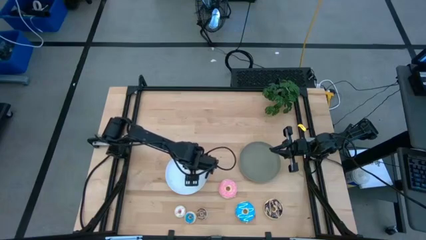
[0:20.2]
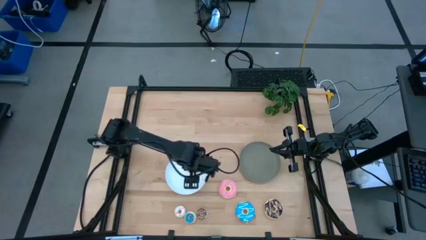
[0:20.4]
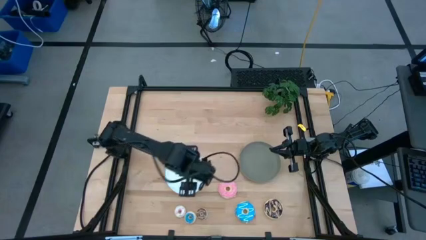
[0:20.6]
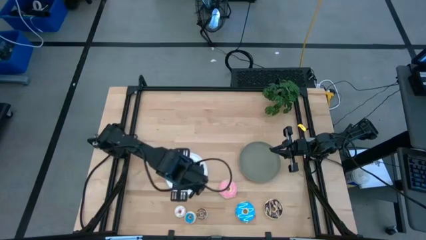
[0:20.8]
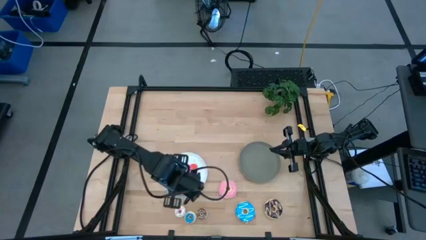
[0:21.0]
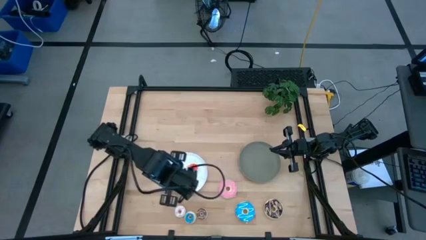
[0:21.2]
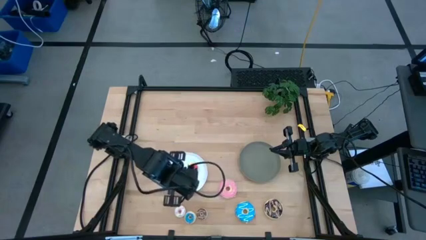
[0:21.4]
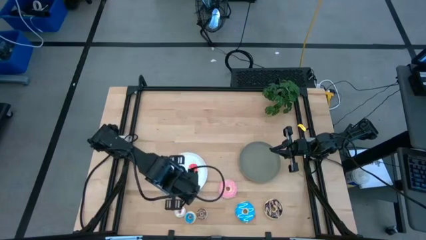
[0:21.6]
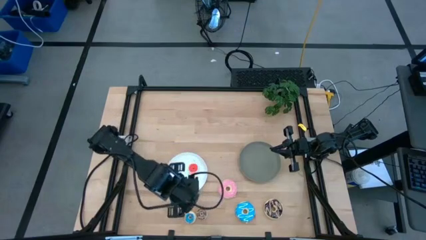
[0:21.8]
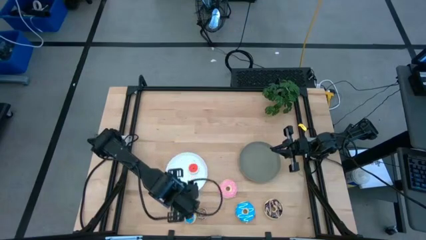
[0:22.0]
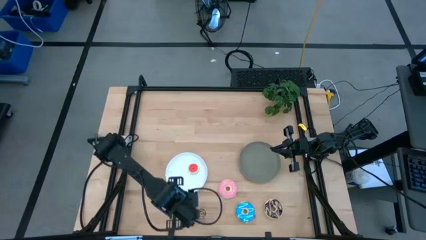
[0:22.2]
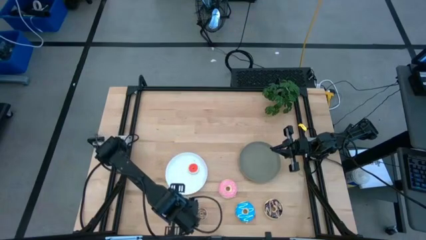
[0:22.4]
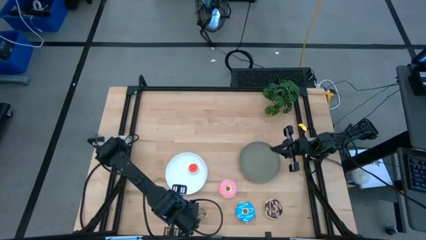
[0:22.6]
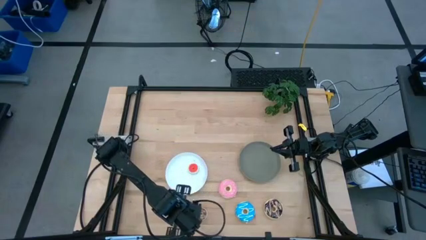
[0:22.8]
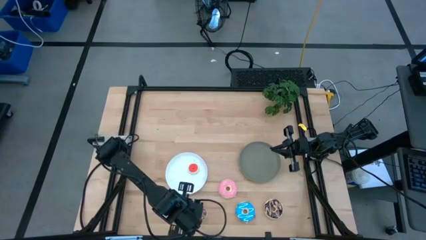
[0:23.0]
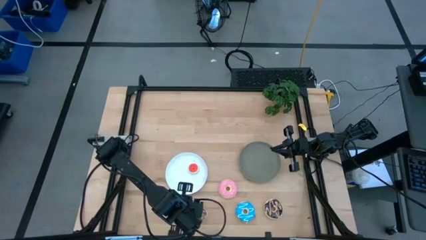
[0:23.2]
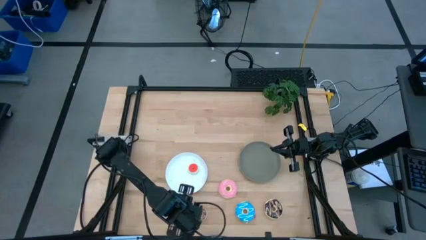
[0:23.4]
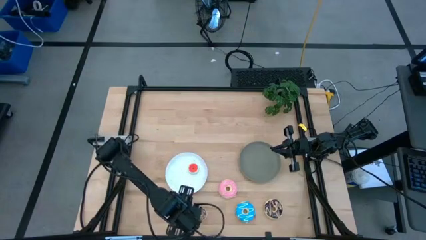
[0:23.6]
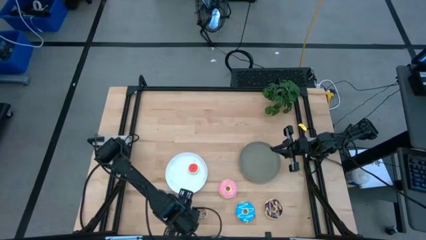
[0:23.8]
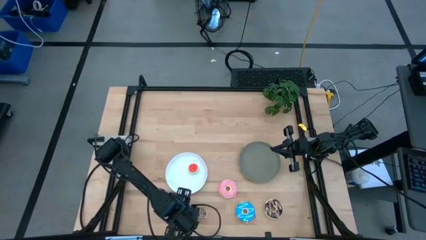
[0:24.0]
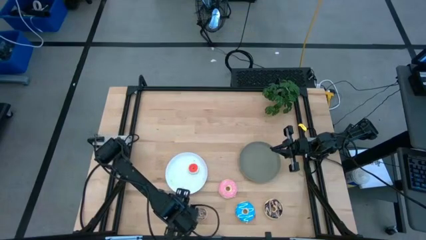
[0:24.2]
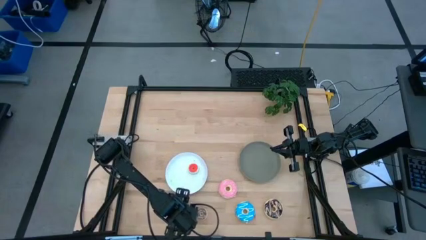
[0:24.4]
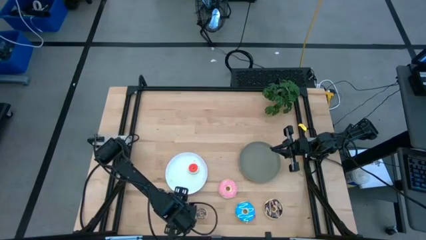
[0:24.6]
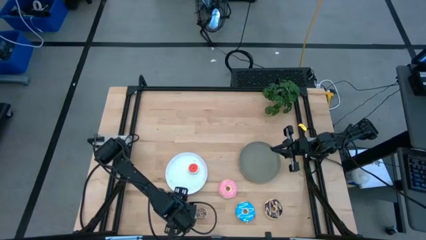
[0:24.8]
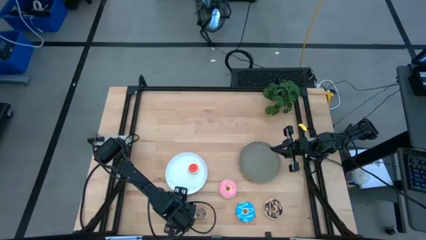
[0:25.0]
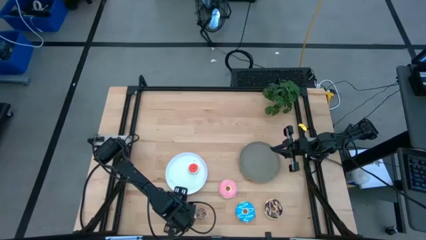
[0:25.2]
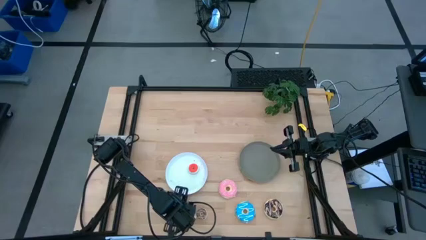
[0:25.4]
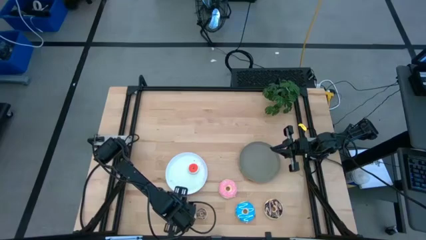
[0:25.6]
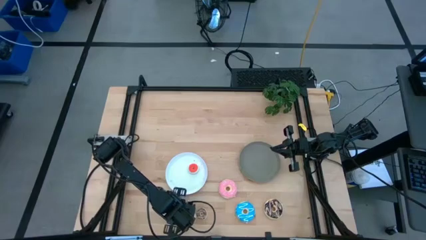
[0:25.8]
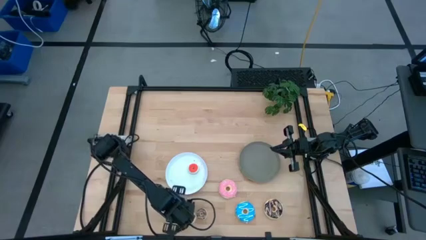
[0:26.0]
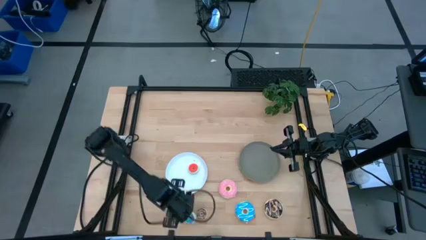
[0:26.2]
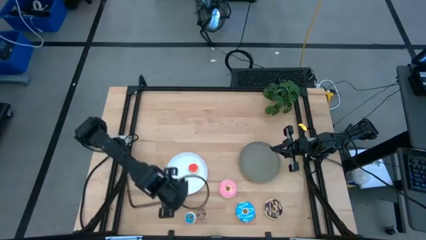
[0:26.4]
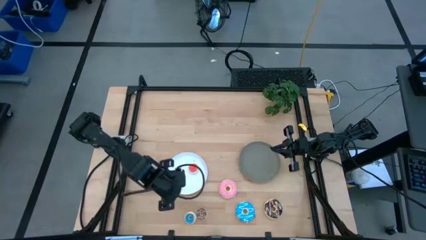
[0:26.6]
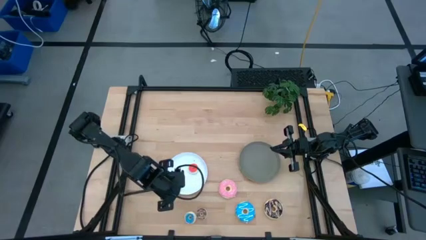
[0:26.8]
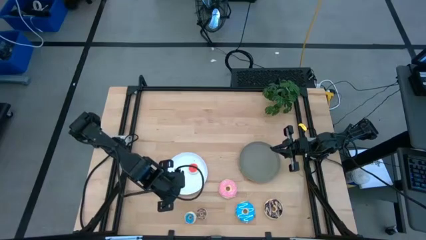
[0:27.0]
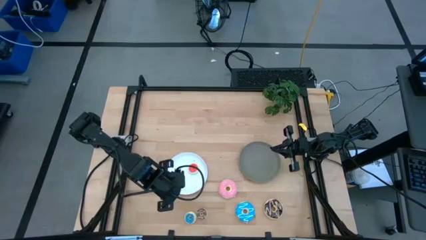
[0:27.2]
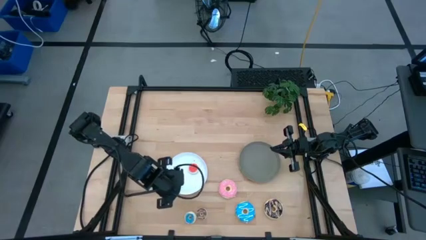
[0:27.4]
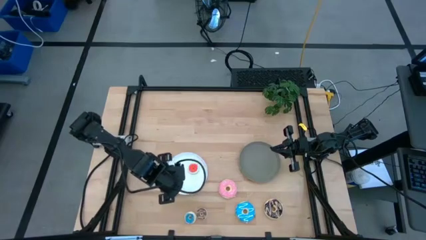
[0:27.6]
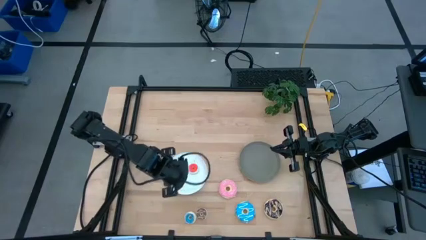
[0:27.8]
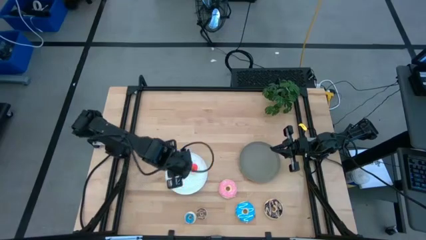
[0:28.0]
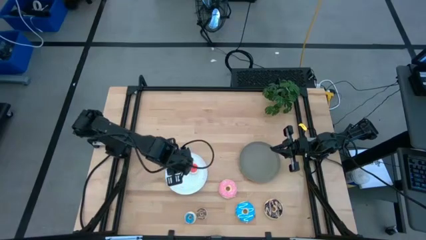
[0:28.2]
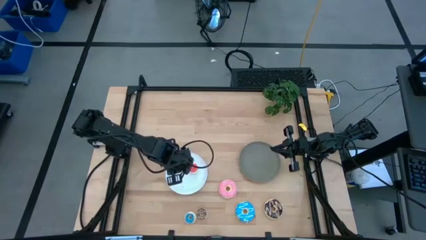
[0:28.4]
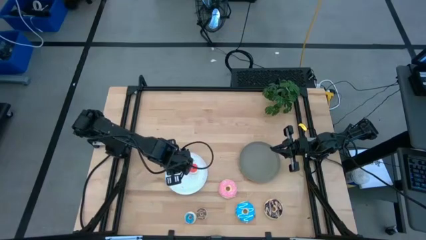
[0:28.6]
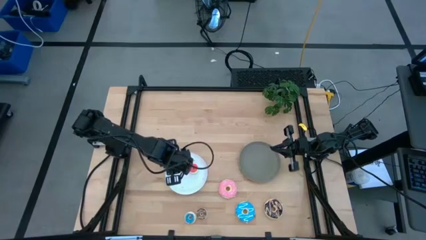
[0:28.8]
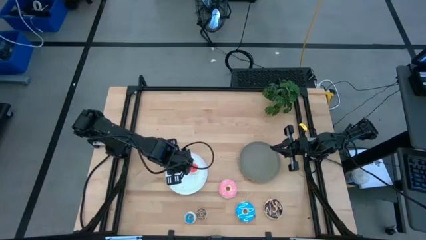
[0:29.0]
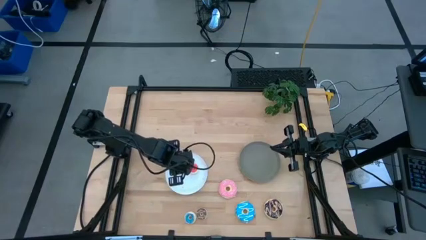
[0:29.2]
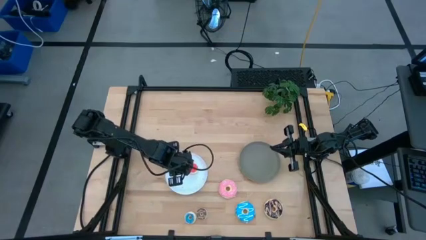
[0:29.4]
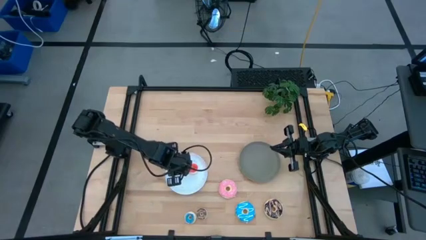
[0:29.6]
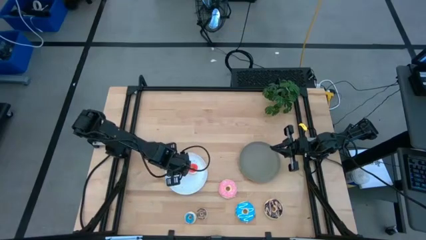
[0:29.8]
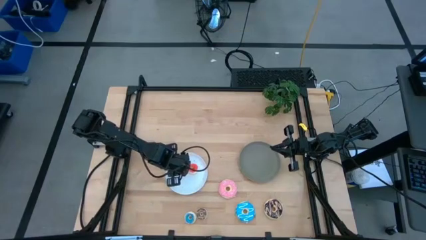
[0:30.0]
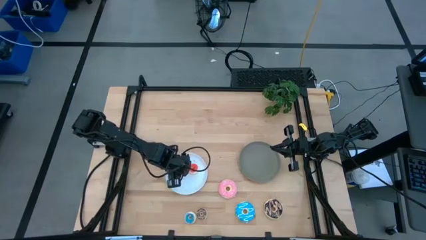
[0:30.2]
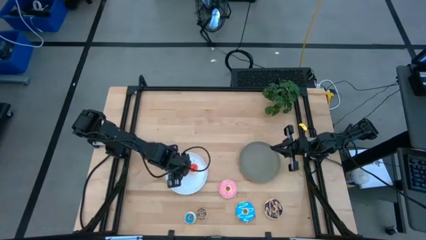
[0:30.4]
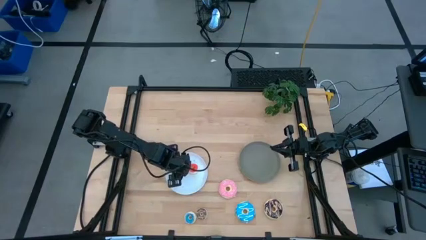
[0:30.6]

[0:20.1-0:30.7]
Task: Pick & Place donuts
Put the small white donut on the white plate

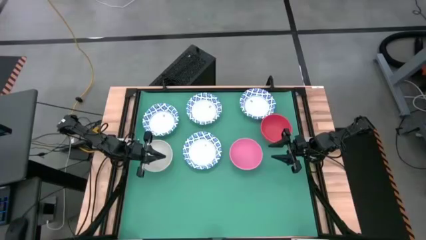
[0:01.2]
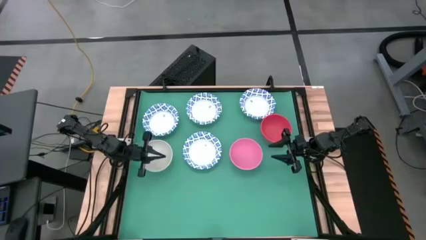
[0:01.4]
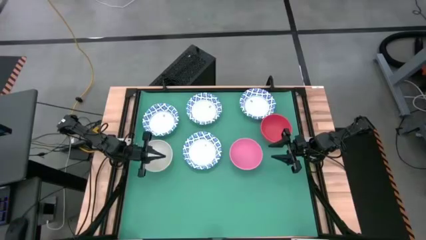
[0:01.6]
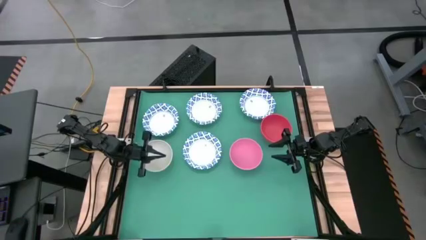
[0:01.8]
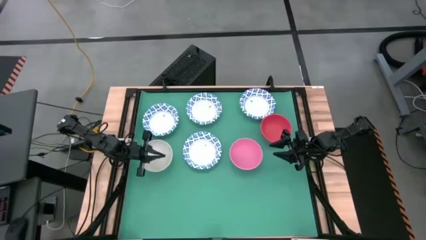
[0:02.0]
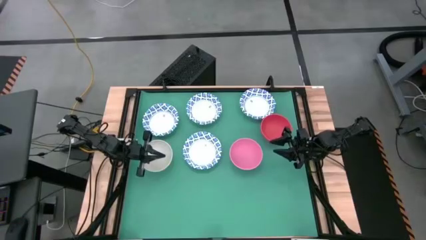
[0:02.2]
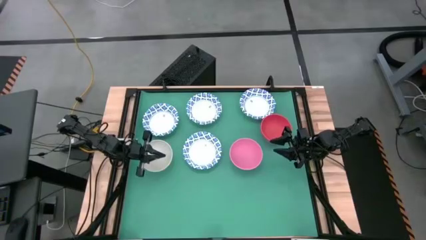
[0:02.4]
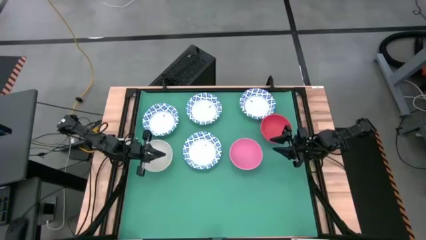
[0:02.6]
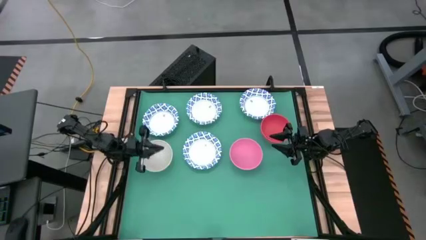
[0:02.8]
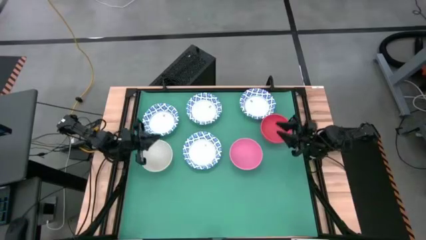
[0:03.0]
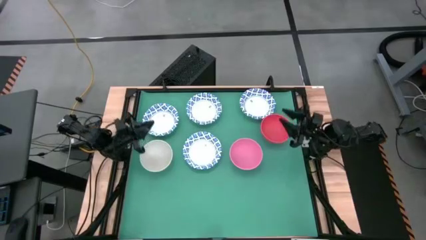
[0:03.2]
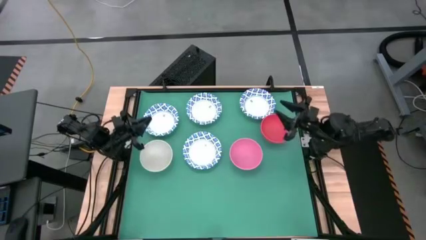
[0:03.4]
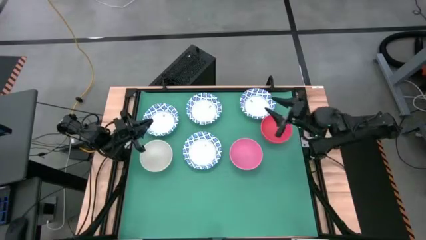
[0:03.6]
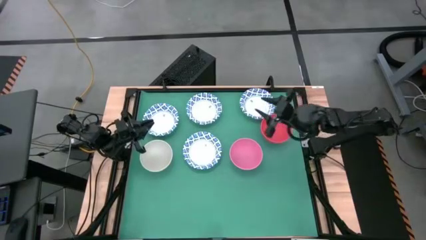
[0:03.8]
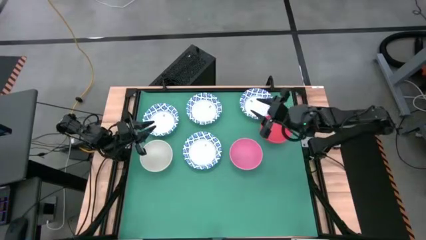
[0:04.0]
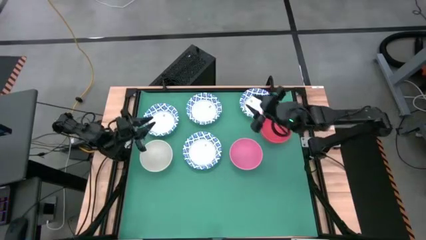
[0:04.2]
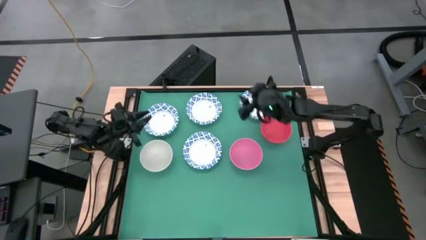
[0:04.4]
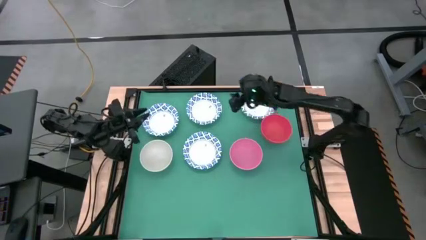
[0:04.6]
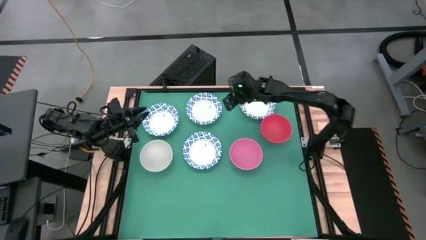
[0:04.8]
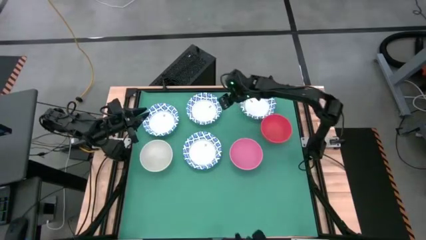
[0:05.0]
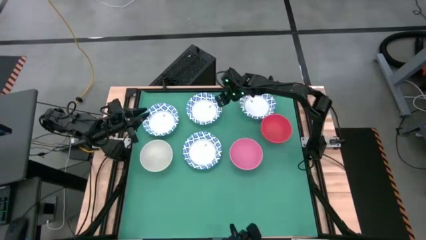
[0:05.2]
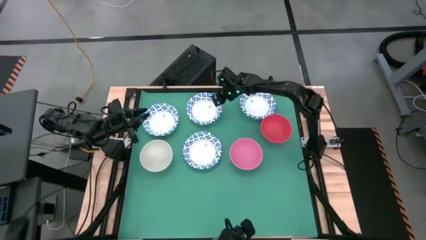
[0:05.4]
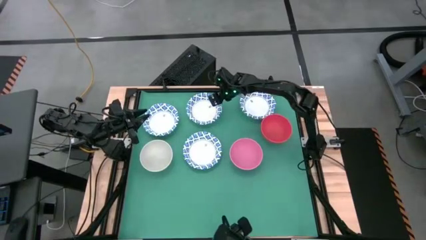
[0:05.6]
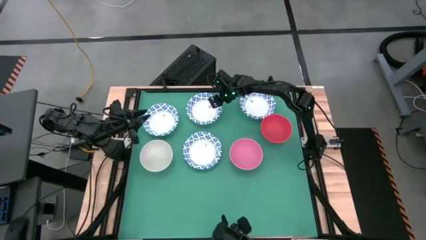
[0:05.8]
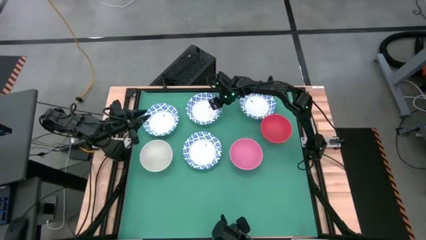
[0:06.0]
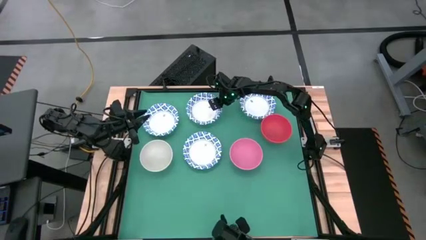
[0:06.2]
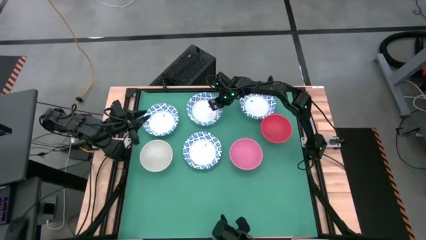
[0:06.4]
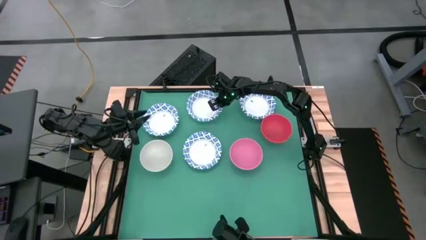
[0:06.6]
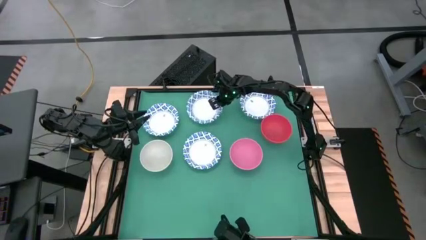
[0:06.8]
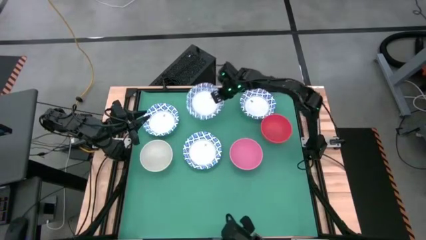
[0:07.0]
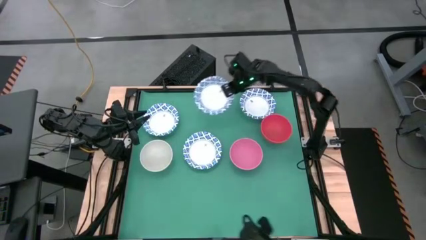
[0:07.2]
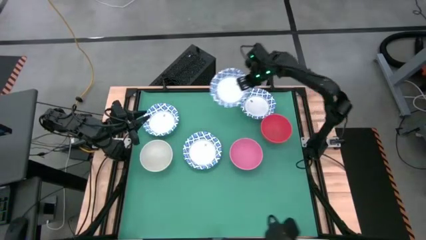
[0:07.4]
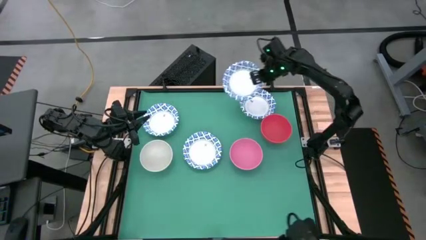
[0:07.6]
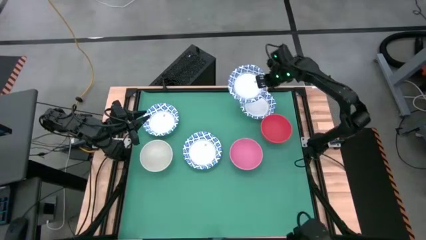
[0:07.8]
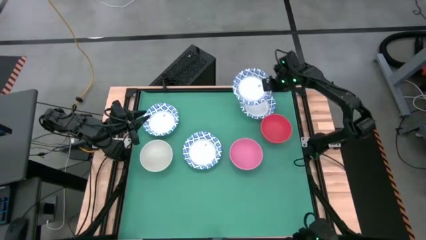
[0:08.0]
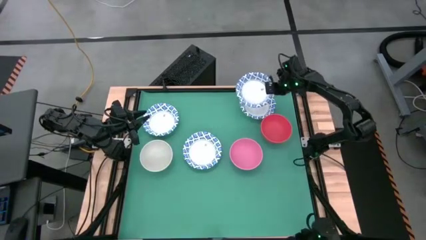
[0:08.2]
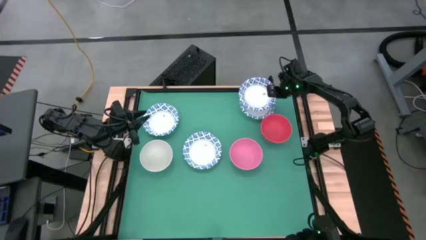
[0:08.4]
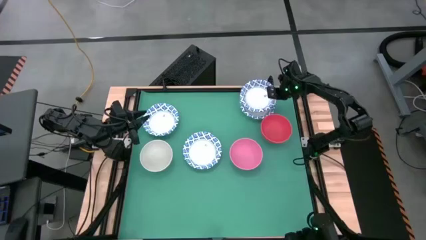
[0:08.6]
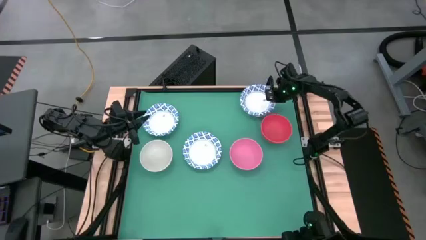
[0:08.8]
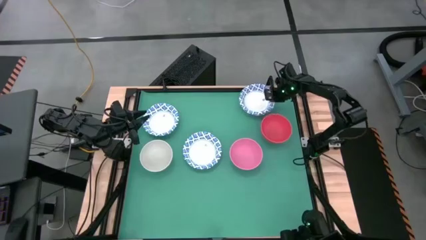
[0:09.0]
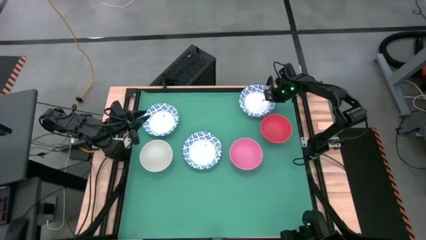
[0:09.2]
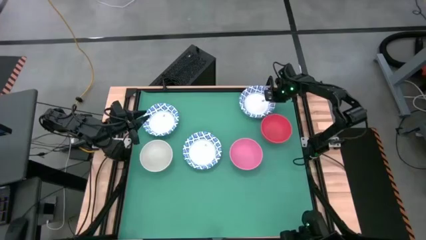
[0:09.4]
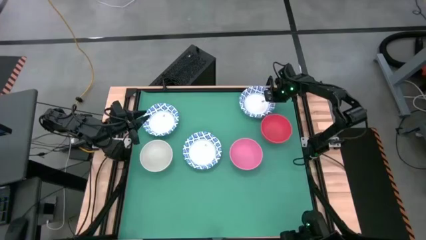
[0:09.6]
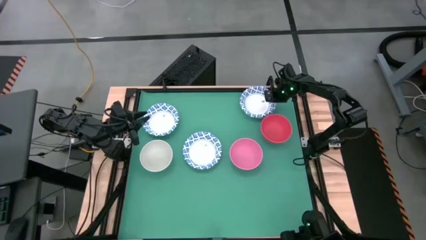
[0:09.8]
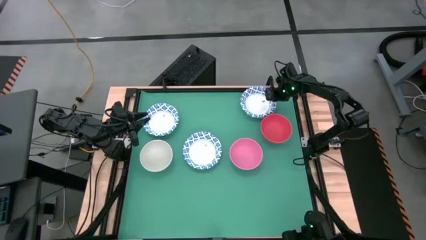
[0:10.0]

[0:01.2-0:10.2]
Task: Nest bowls inside each other by size order
Stack the white patterned bowl on top of the white patterned bowl
